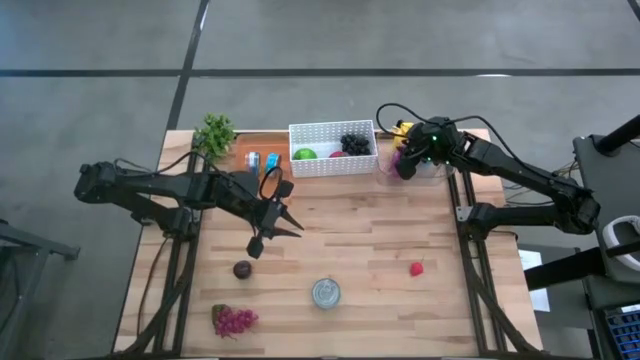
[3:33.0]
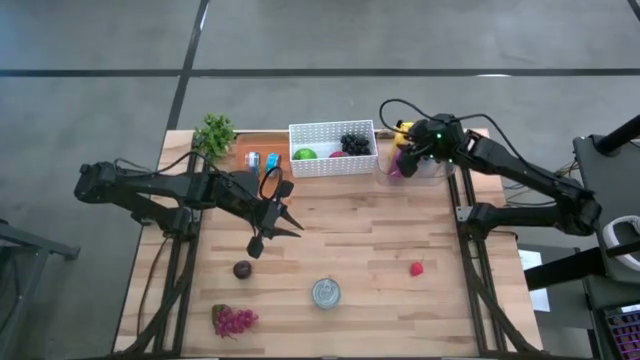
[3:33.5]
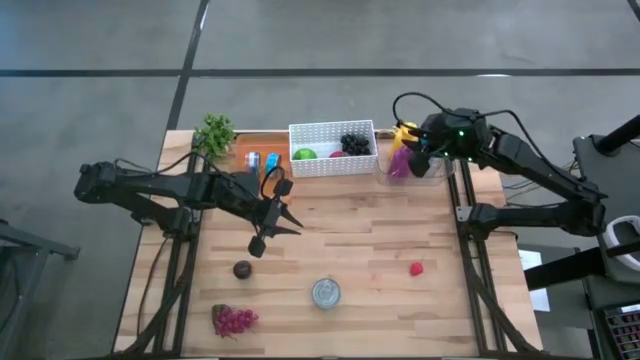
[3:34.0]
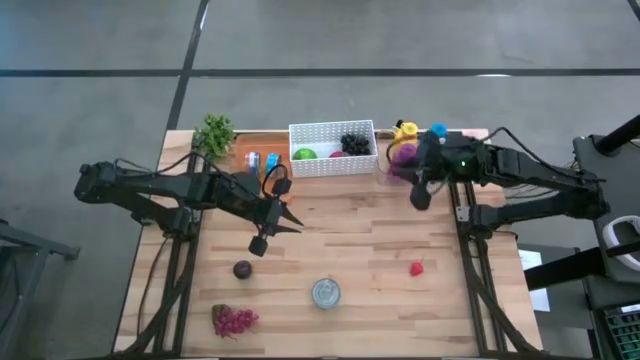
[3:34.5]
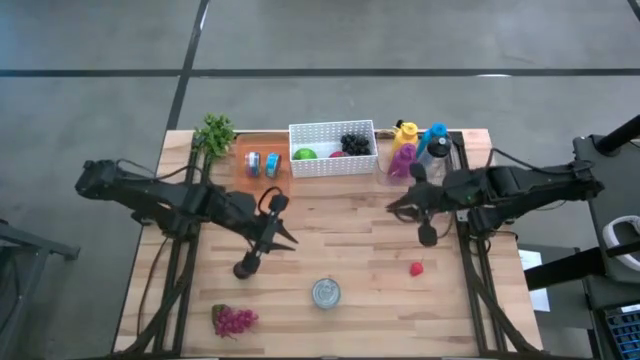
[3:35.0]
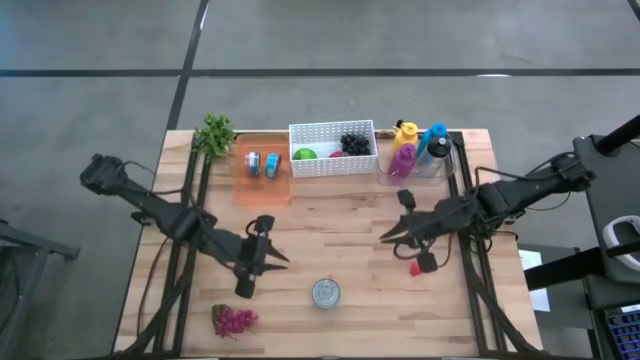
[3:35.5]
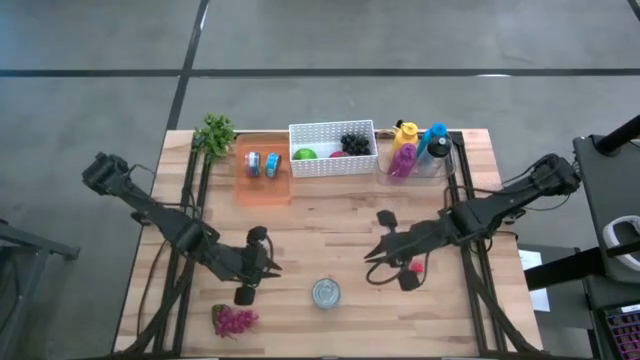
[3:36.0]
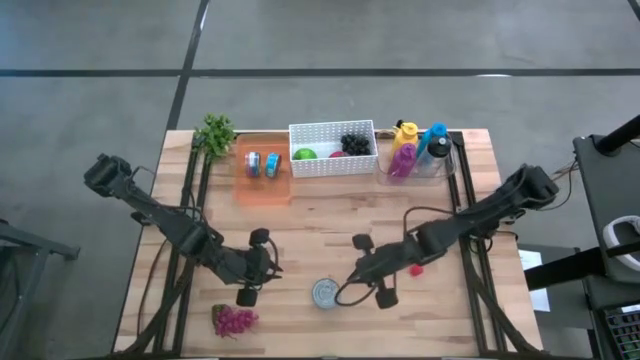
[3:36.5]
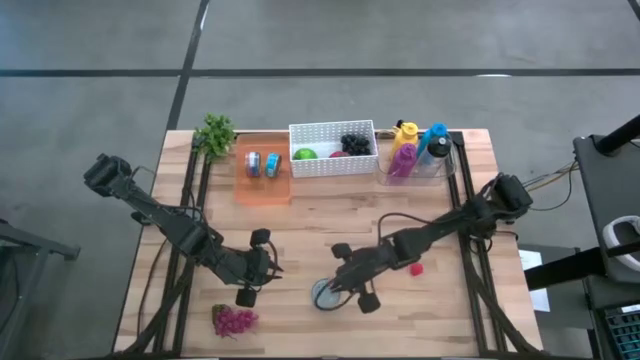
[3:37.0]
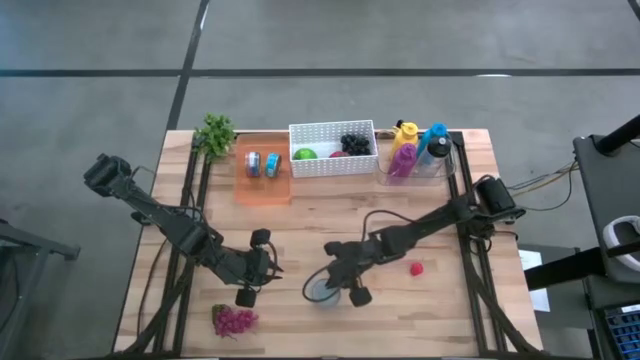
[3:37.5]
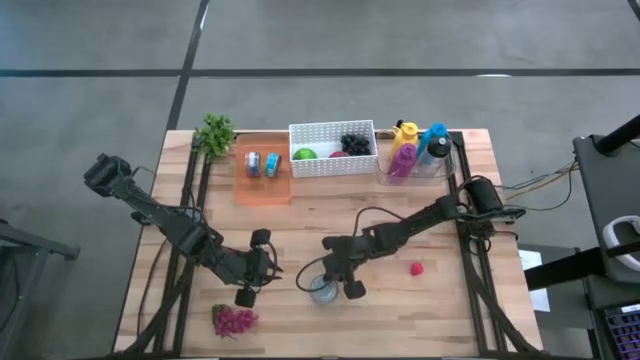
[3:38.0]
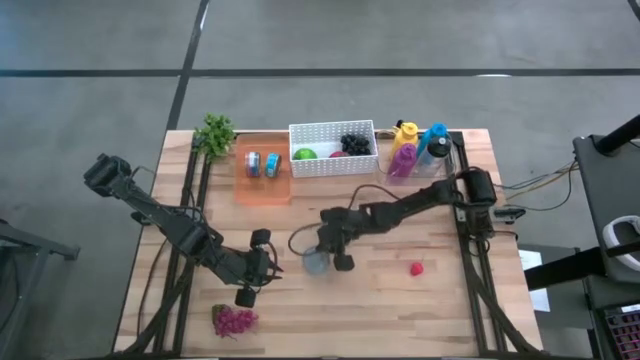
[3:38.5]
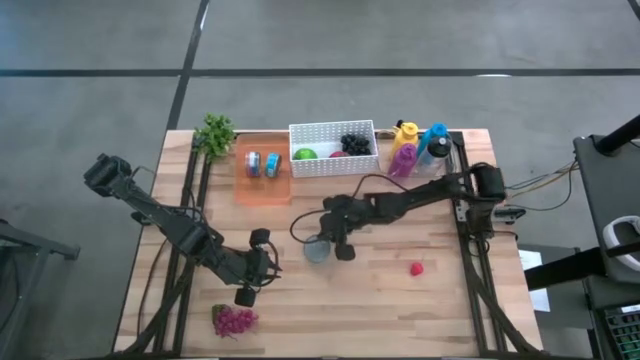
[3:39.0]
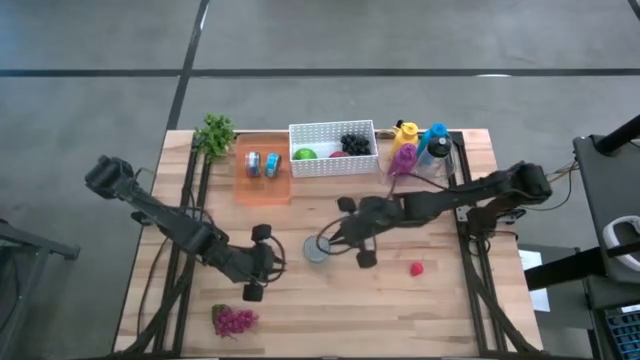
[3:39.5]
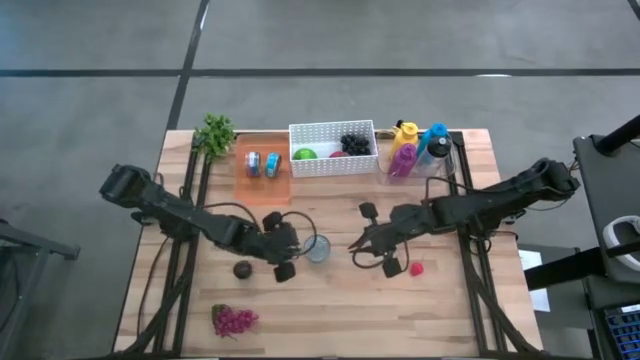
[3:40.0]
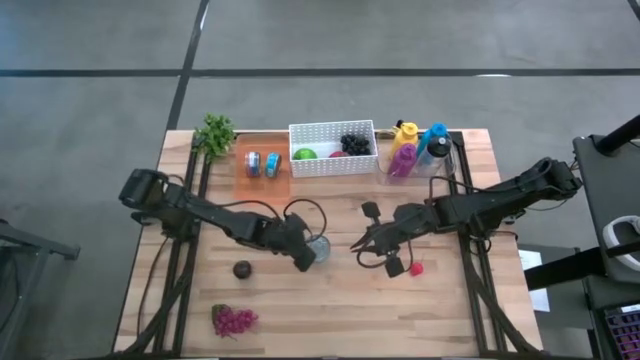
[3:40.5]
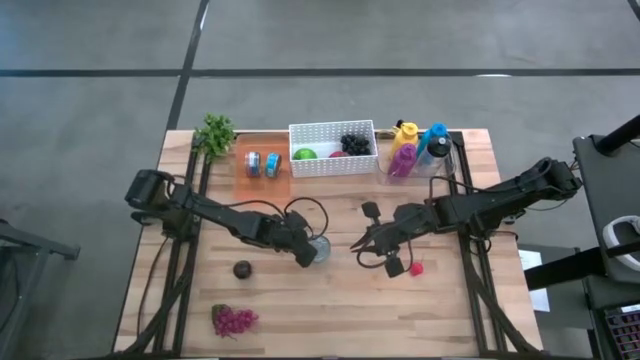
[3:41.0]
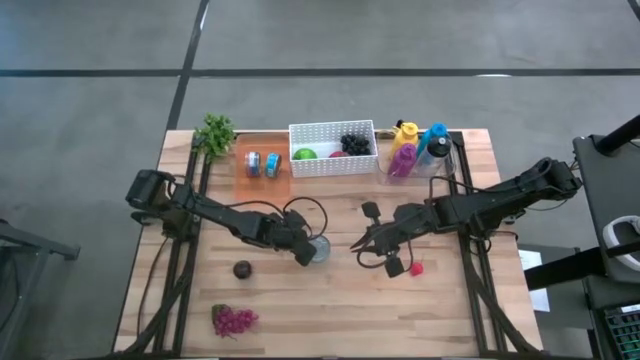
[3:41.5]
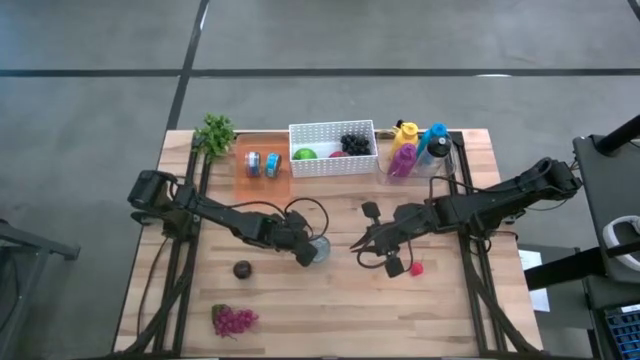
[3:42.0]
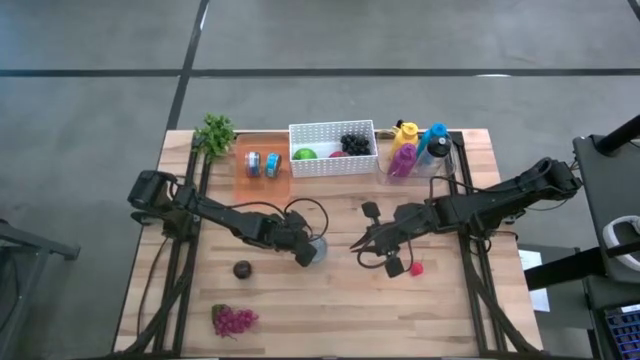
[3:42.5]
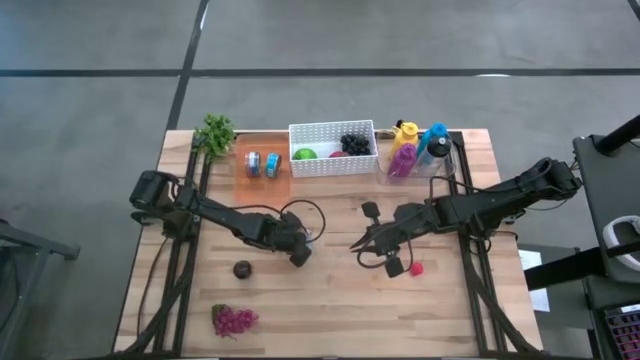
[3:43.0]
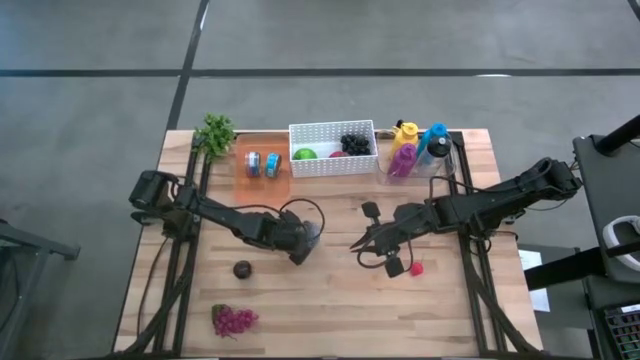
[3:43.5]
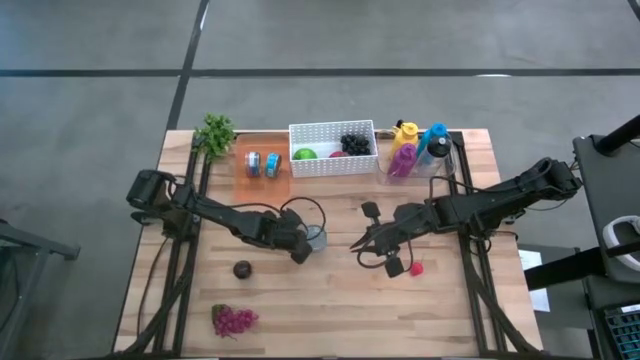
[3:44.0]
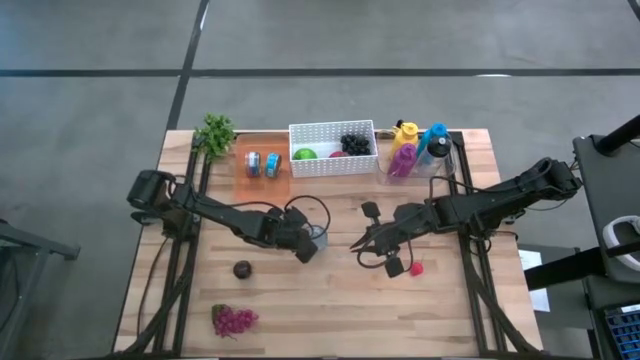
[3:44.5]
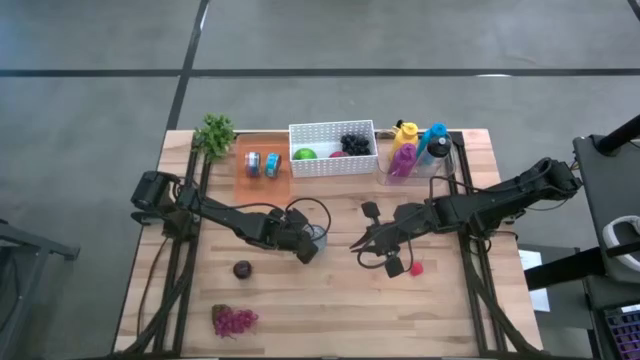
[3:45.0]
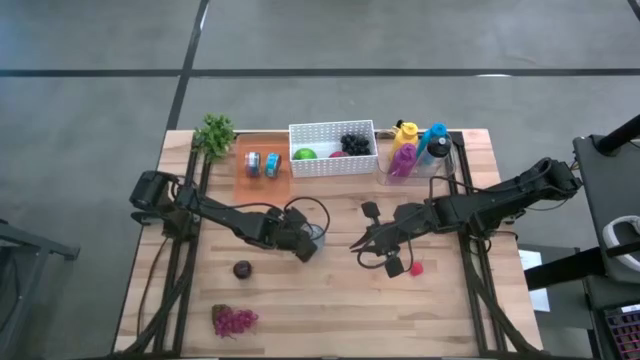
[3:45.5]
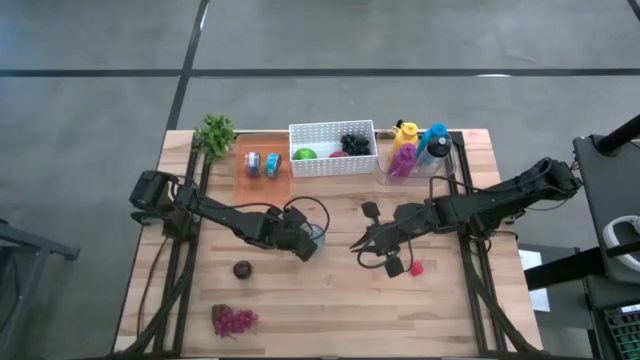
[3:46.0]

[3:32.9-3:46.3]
Task: Pick & Place Food Item
Put the blue tuna can into the orange bin

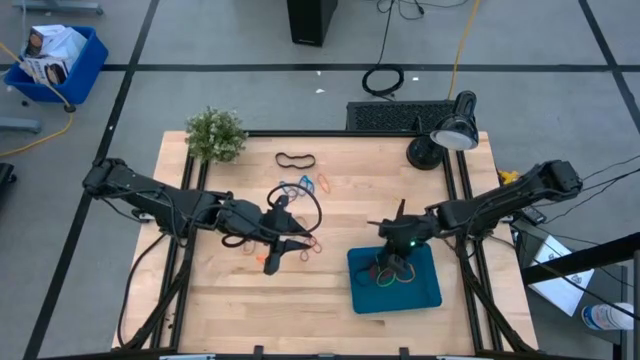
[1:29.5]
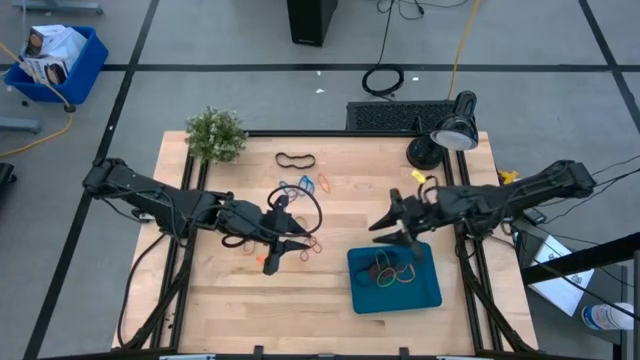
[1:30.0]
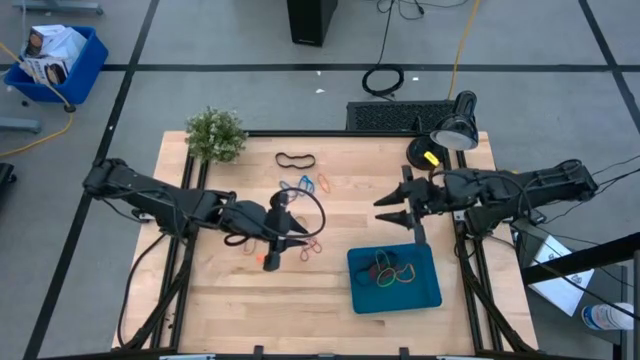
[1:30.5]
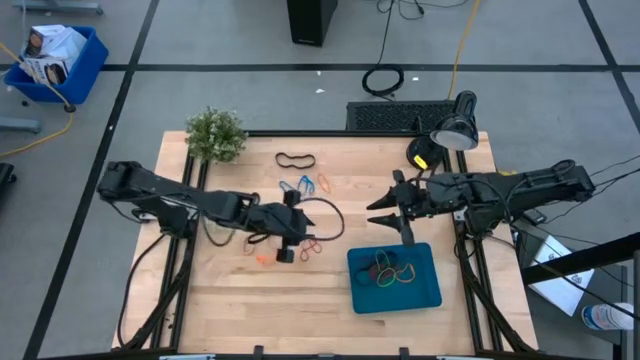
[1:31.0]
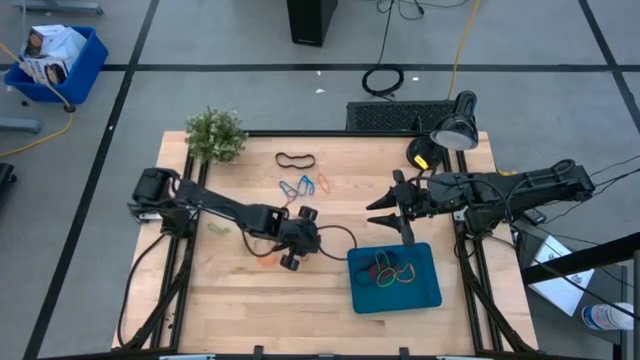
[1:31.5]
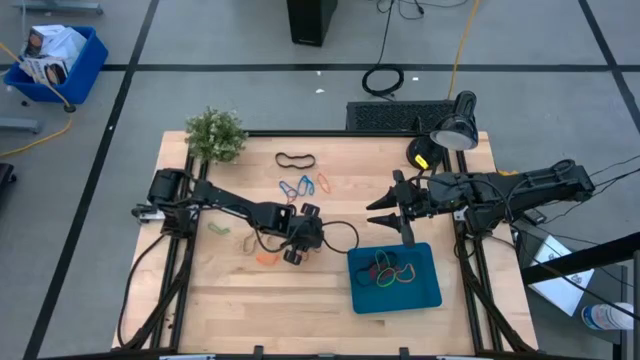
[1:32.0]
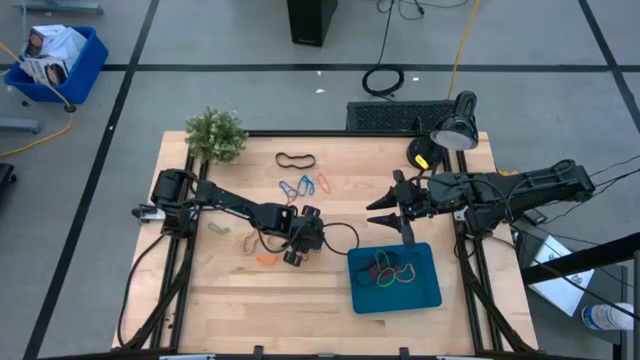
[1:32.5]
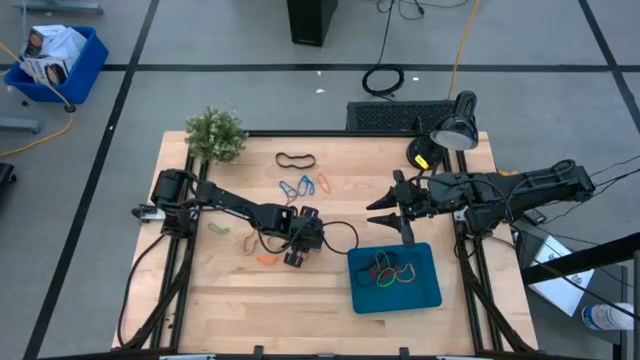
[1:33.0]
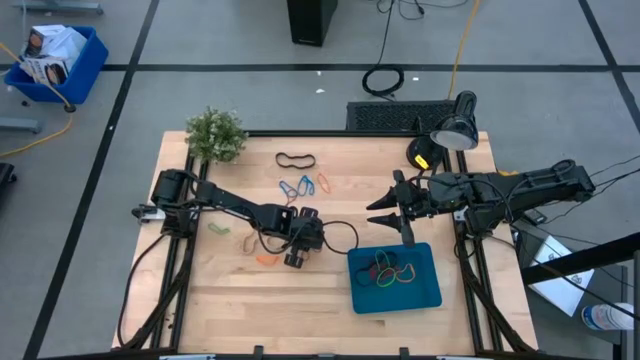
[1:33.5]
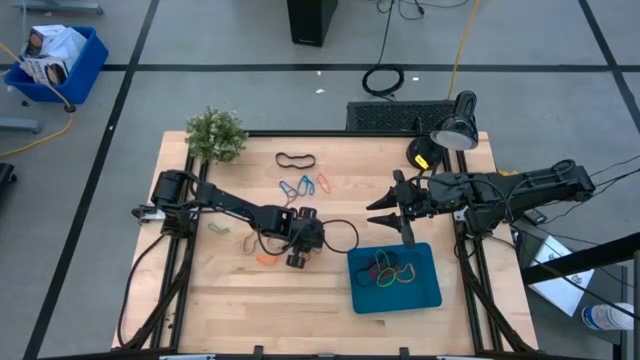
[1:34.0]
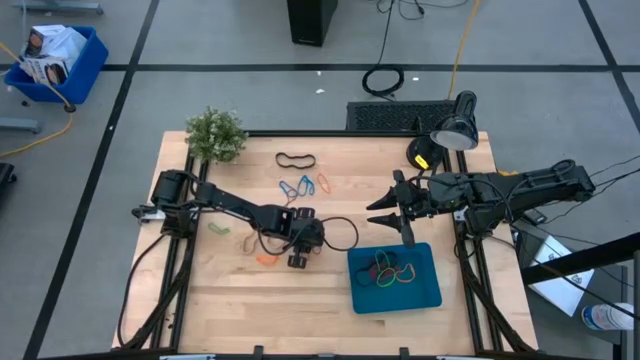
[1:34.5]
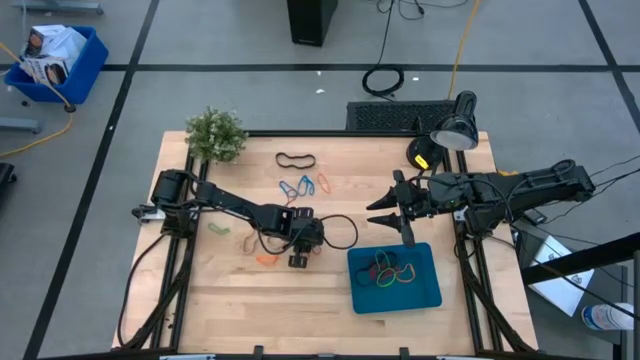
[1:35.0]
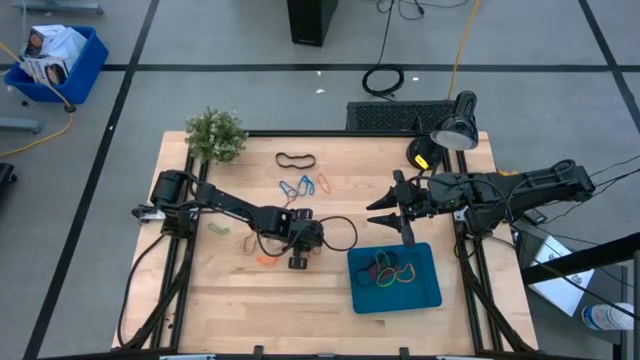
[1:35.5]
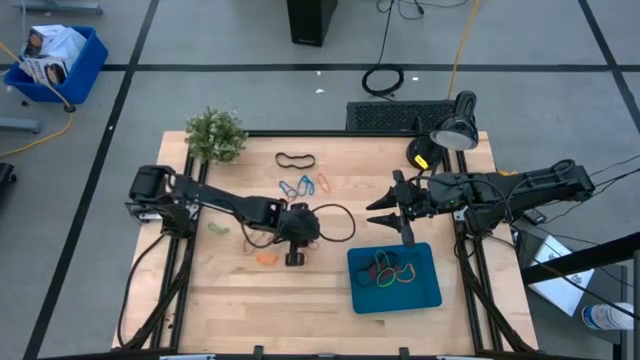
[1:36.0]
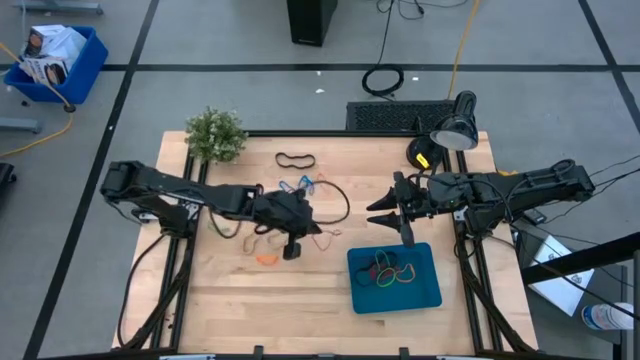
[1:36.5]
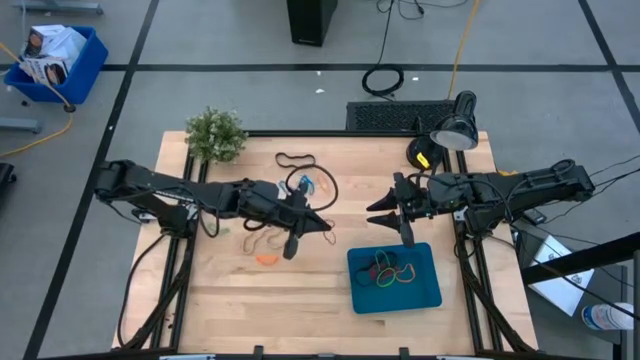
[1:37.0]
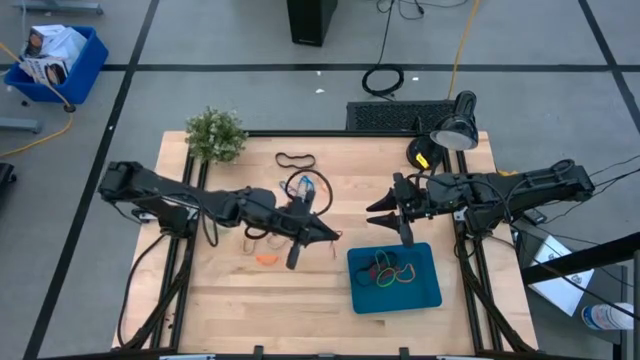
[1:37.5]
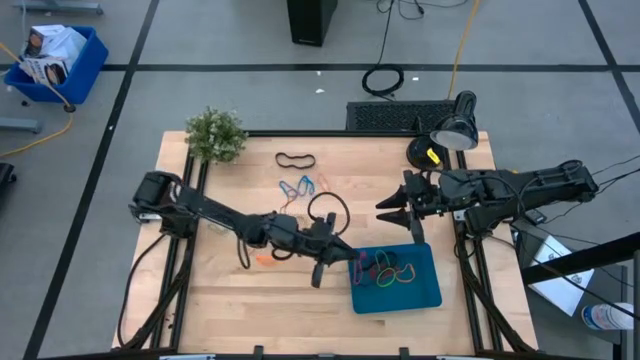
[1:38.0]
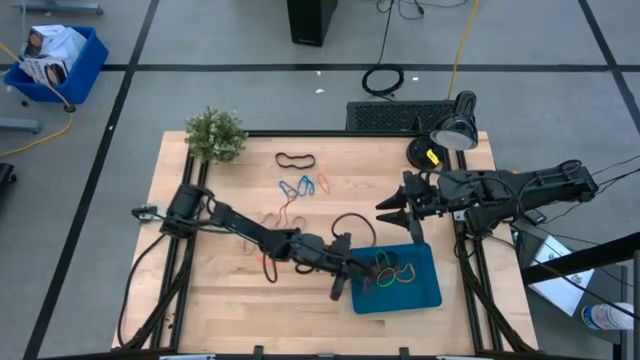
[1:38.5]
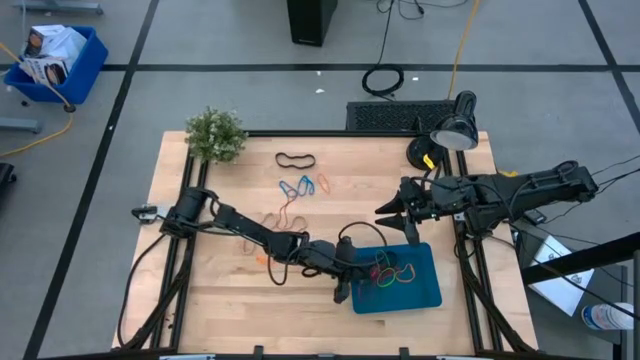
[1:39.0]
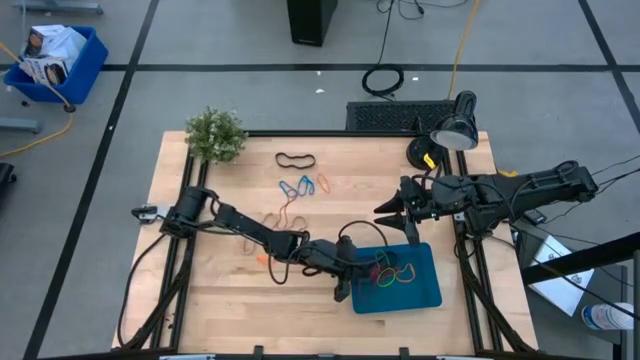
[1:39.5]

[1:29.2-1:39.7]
Task: Pick and place rubber bands into bin
Put the red rubber band into the blue bin
